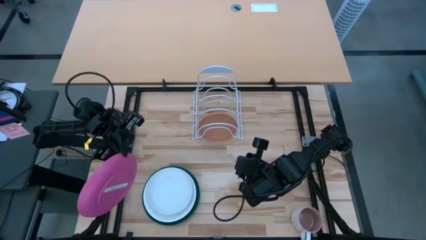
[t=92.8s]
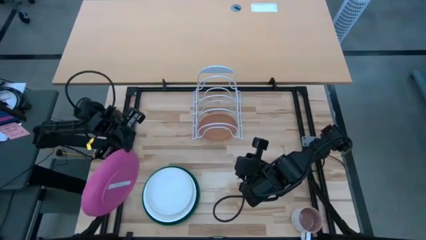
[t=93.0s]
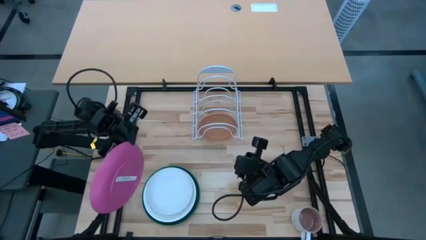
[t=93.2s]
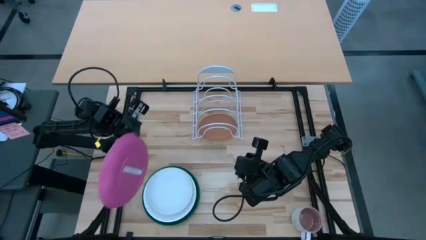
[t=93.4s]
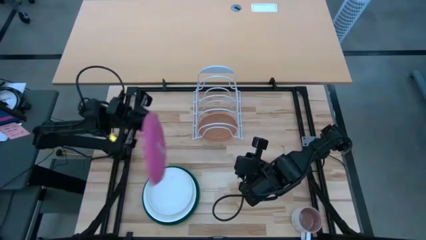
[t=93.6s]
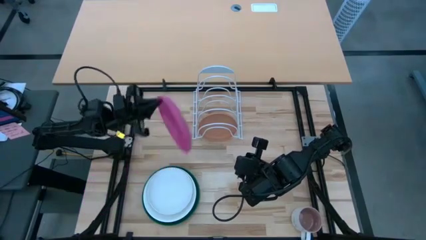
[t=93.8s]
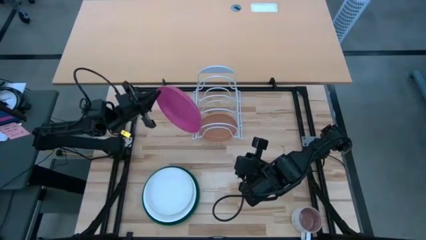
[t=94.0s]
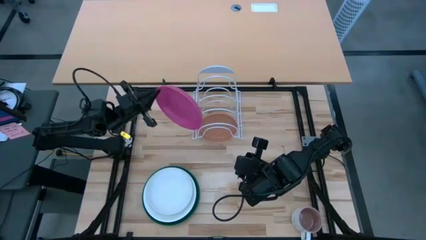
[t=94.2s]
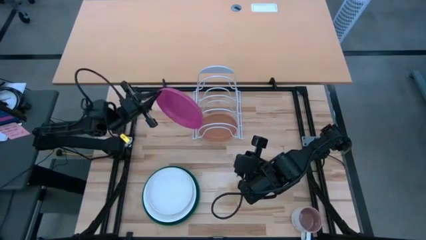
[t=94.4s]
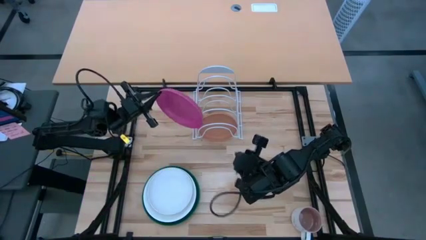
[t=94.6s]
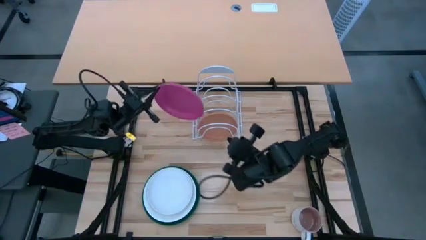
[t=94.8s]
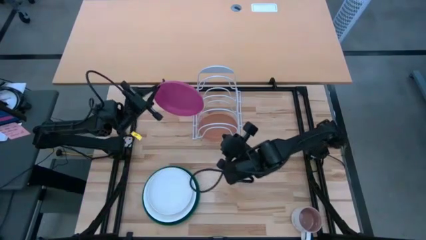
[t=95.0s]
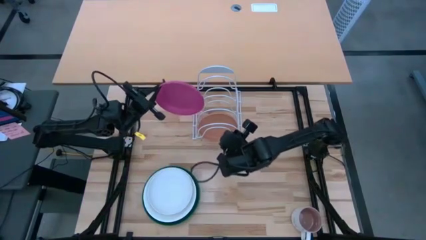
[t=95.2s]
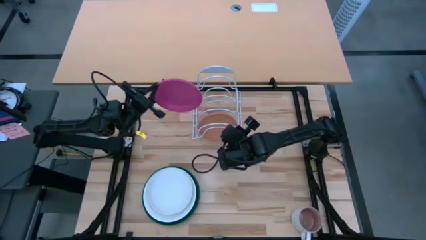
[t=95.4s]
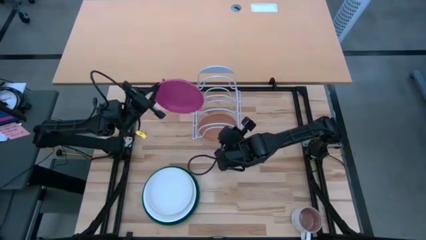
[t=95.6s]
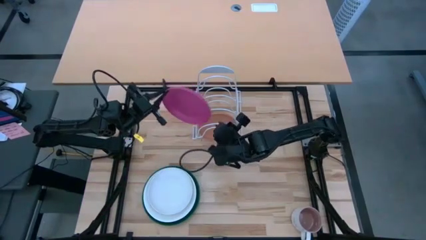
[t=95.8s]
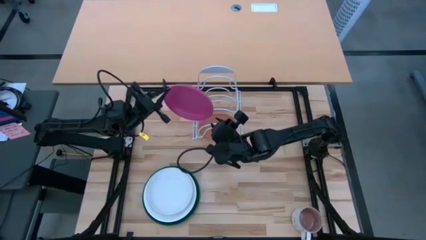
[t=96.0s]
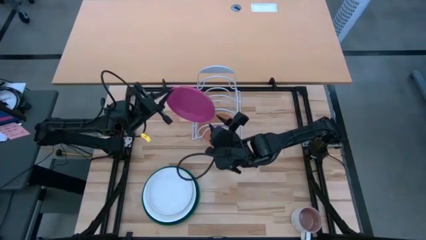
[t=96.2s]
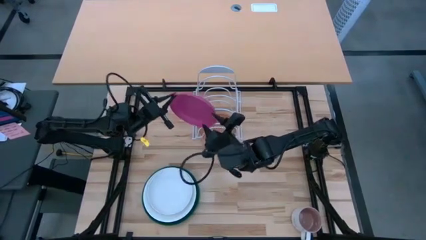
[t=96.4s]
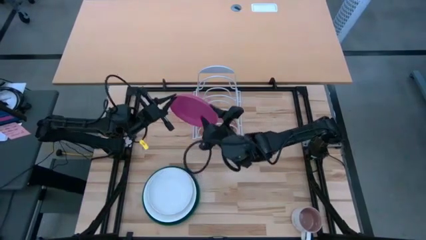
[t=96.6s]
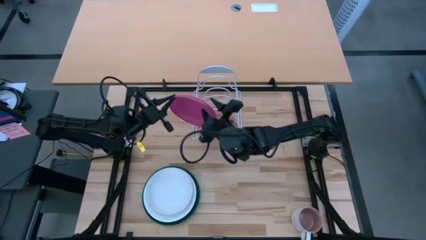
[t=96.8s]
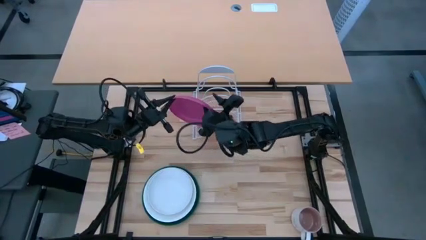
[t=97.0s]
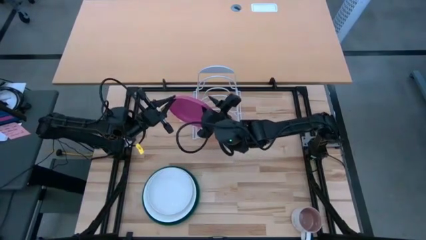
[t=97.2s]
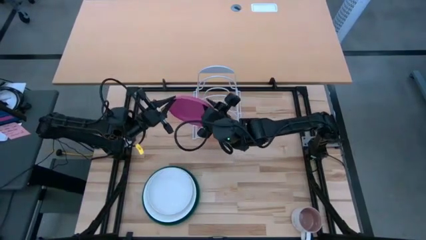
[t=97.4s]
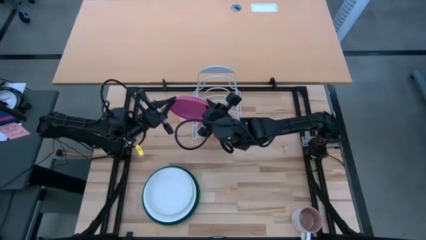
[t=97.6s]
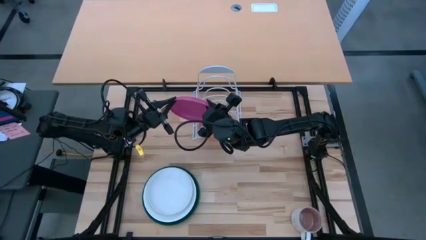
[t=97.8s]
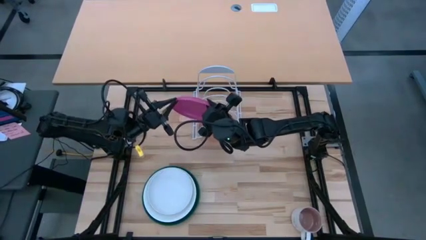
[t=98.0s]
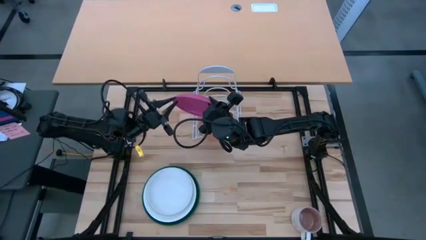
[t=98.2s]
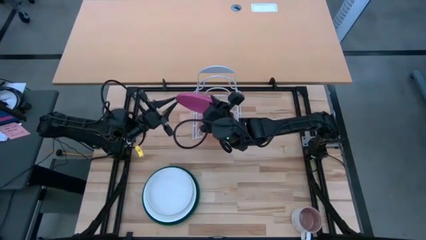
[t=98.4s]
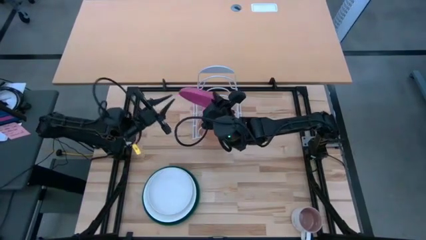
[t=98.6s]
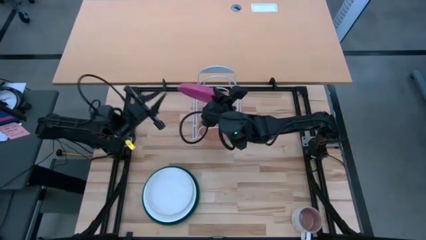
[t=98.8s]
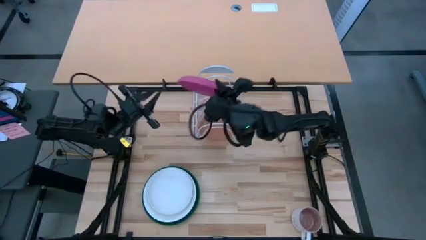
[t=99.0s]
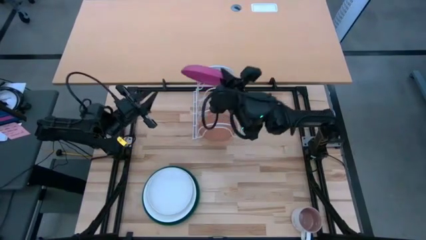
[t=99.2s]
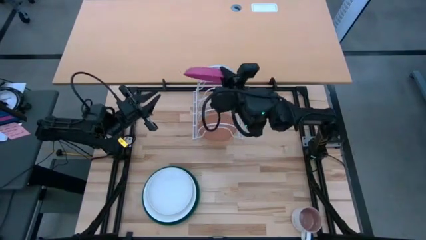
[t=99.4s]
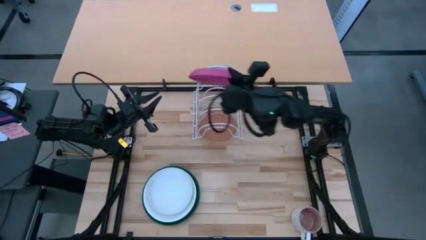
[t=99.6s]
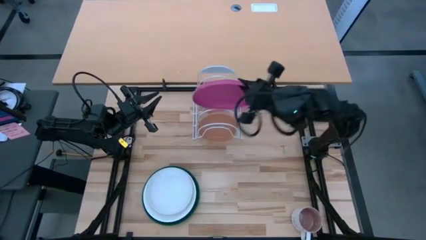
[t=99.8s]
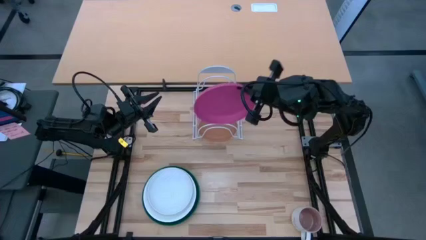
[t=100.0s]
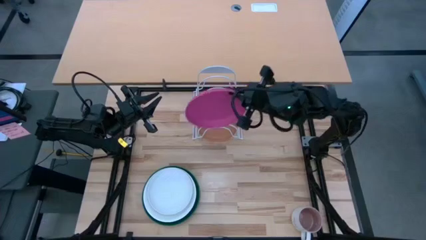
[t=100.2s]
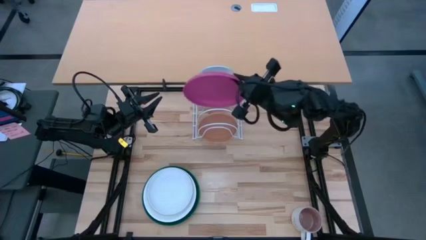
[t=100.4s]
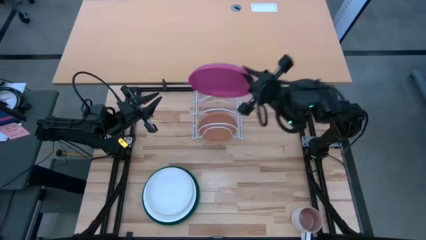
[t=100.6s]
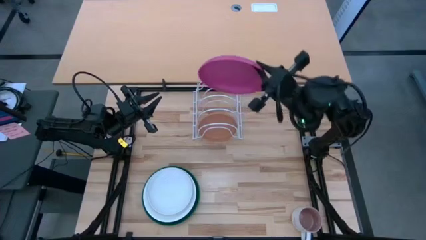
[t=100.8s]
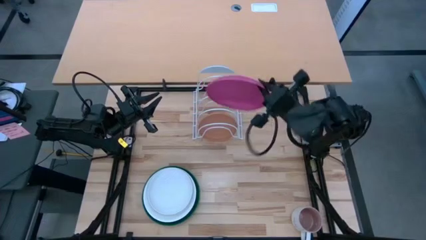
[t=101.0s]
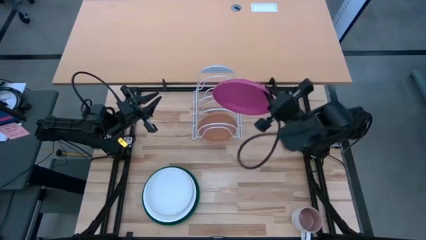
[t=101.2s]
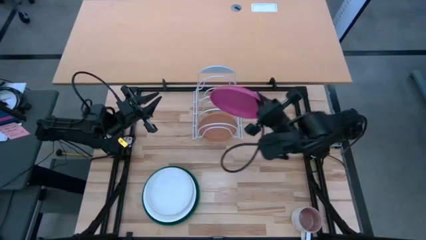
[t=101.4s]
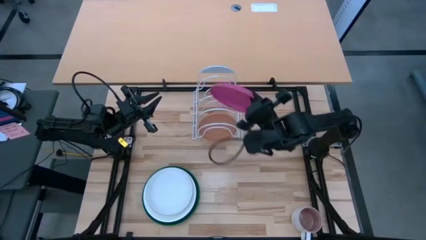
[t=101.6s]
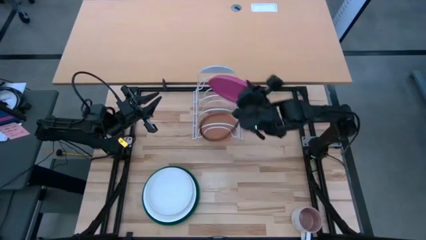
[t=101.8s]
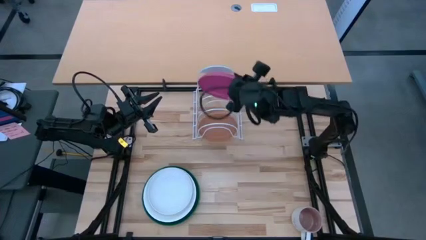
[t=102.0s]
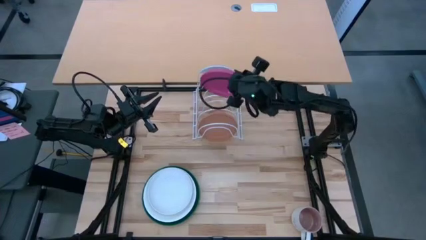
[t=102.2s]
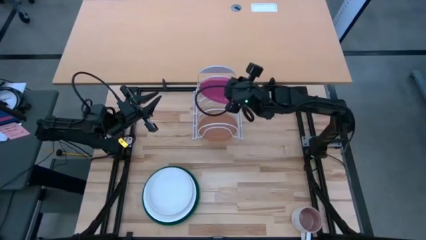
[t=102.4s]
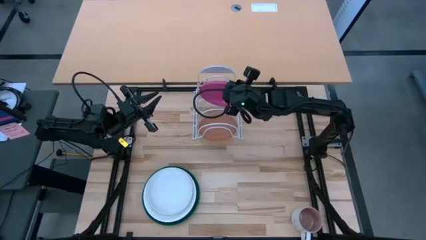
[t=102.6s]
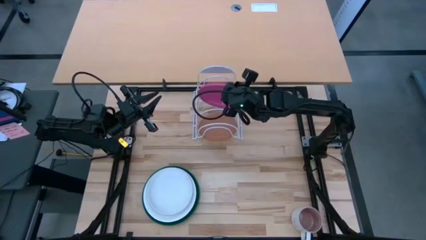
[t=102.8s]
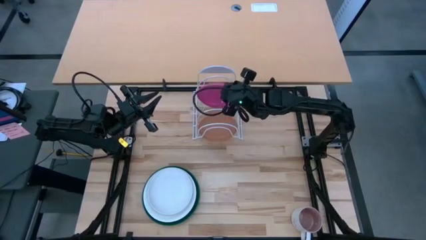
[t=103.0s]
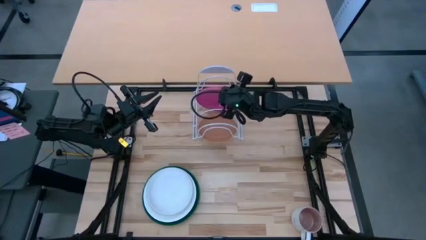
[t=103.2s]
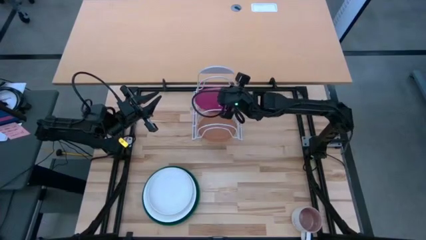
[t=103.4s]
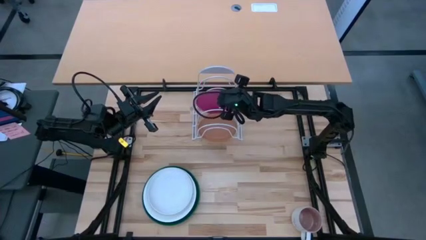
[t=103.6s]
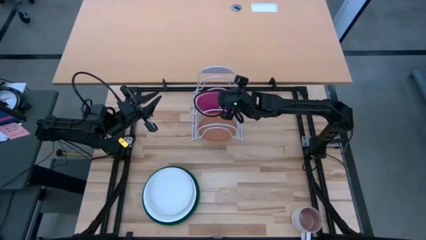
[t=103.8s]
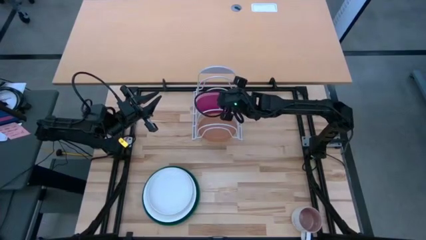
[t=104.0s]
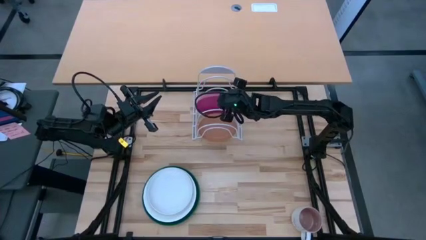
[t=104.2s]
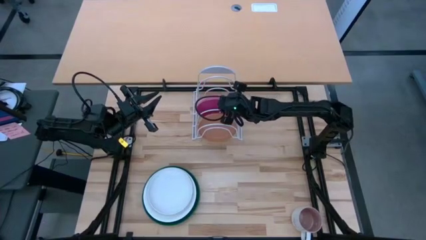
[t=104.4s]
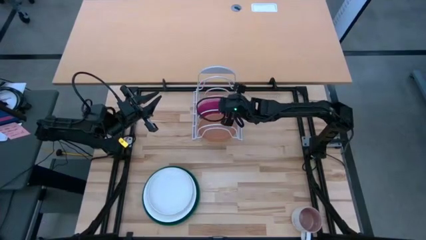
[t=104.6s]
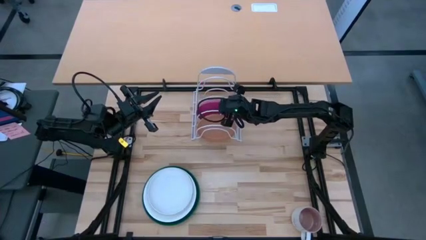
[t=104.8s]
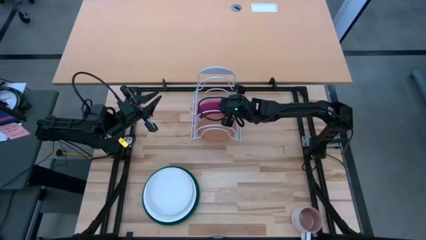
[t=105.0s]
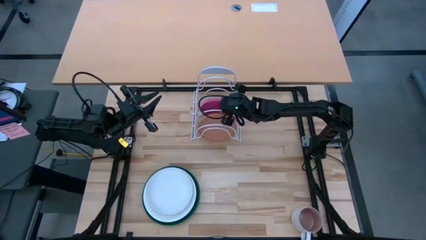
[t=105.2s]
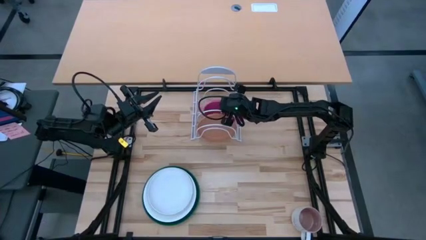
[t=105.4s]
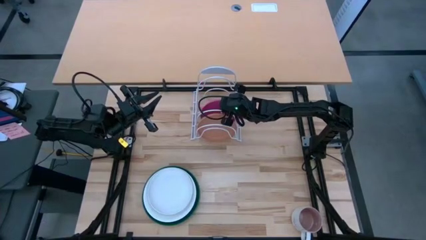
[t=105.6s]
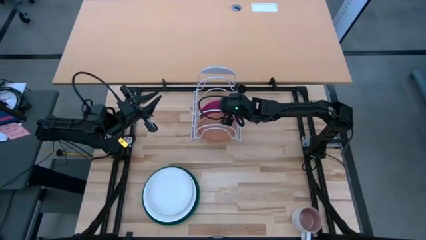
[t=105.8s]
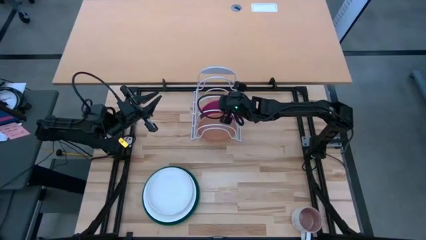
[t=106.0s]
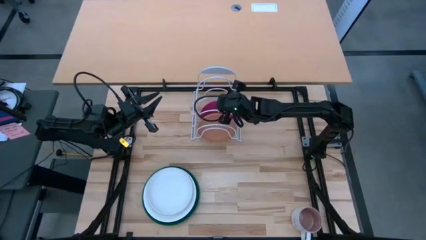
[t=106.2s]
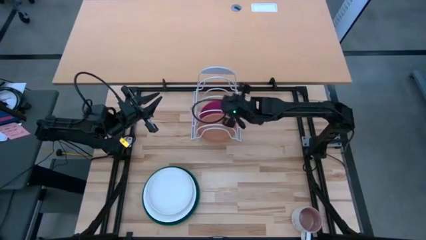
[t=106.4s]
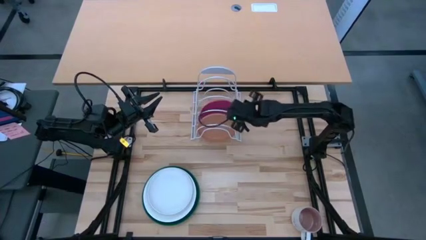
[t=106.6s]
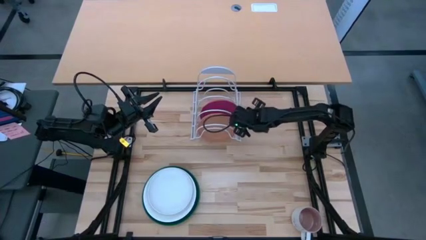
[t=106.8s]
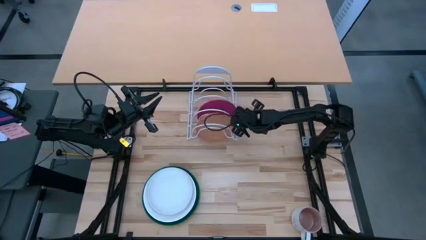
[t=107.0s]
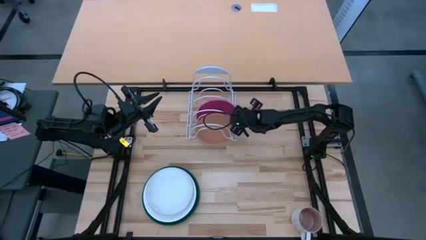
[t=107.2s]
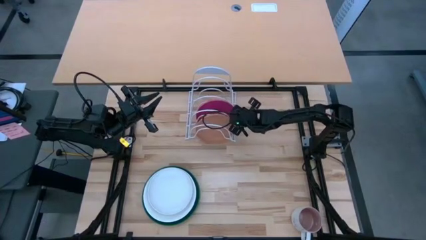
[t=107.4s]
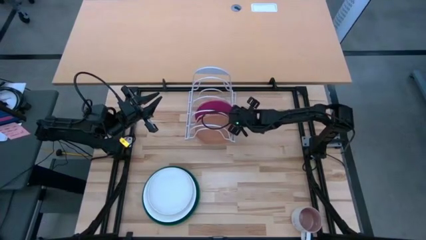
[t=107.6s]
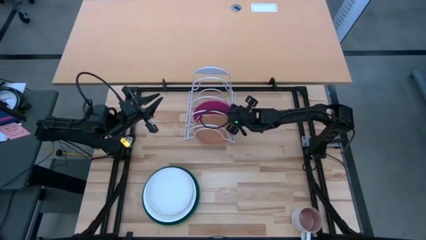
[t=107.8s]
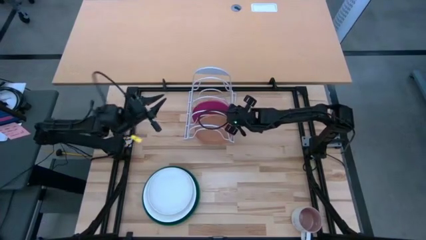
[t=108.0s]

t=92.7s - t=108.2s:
Task: Sort dishes
Put the pink plate on the dish rack
